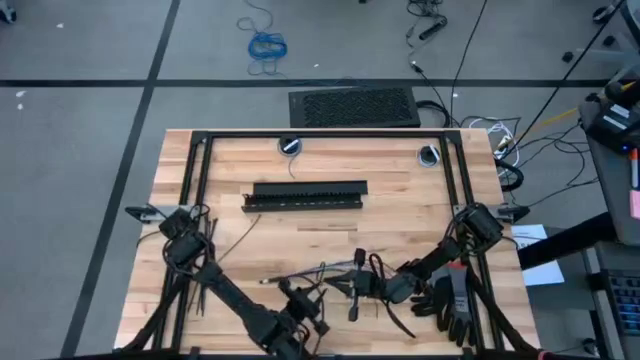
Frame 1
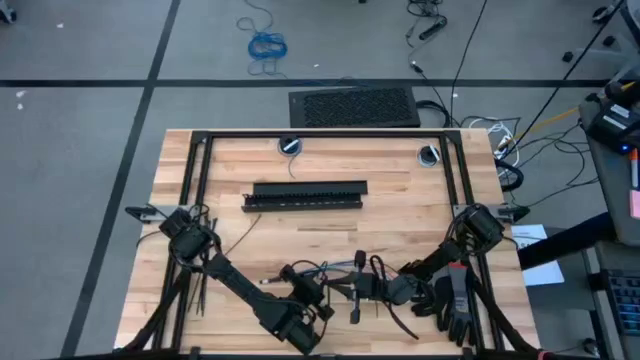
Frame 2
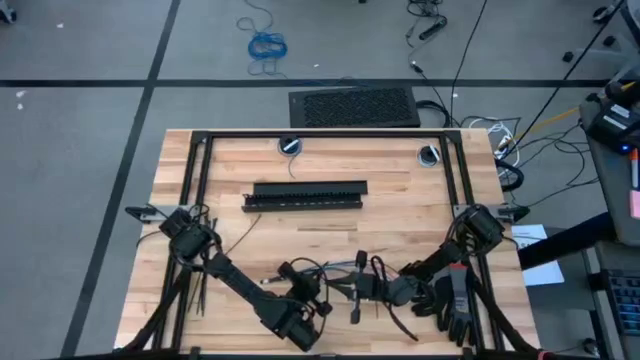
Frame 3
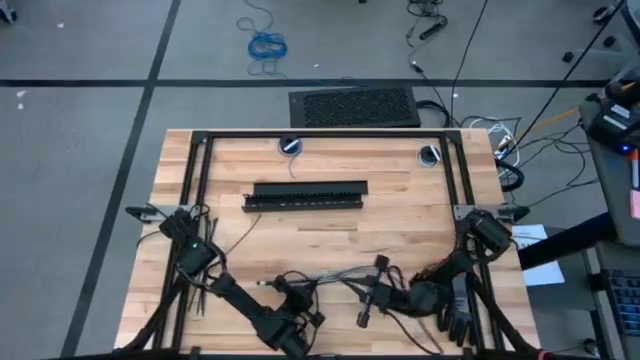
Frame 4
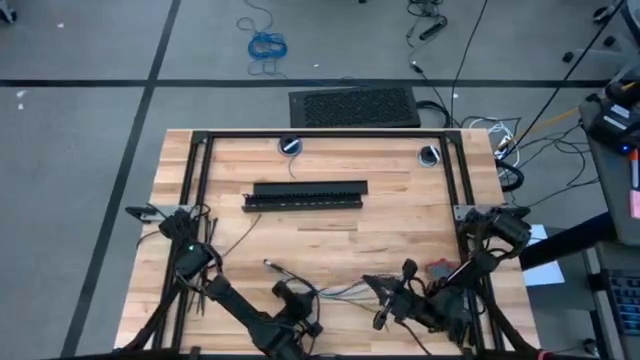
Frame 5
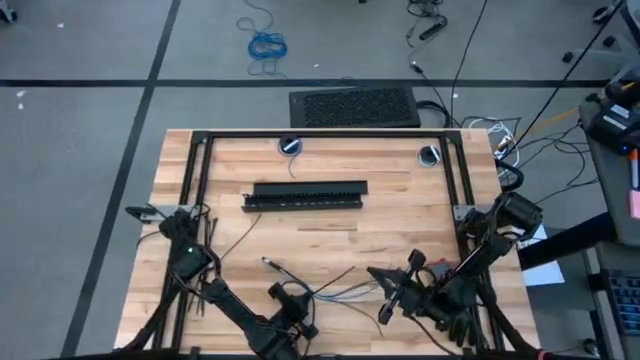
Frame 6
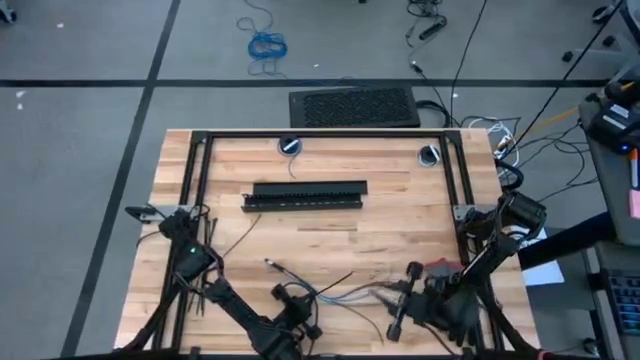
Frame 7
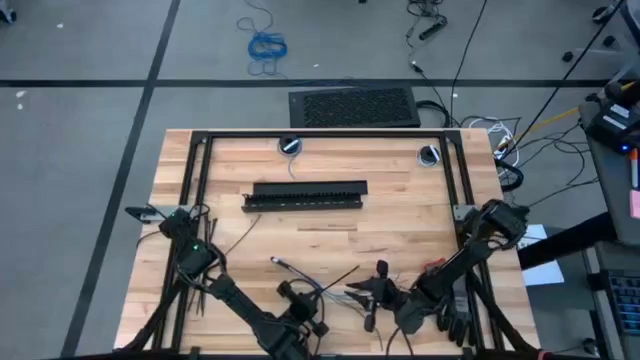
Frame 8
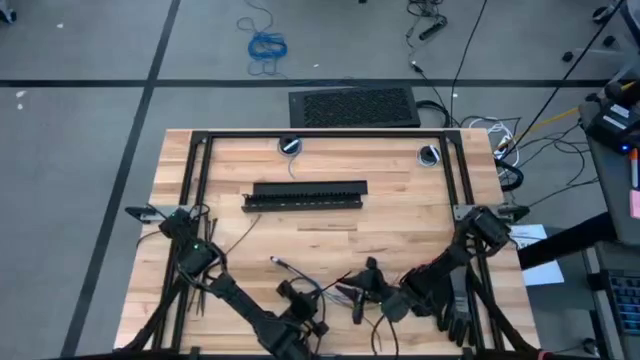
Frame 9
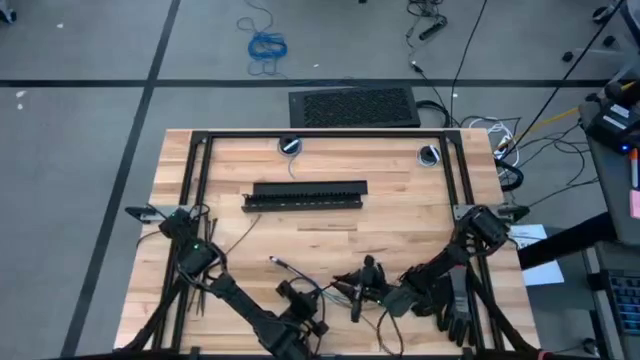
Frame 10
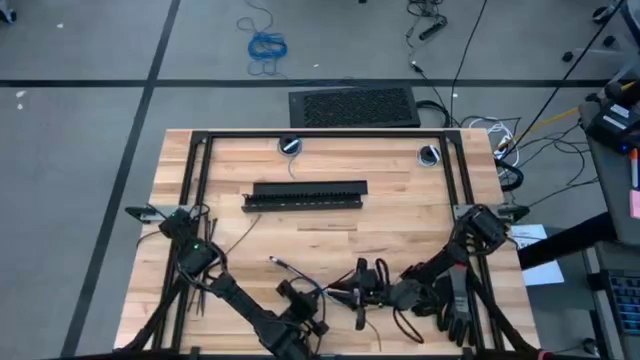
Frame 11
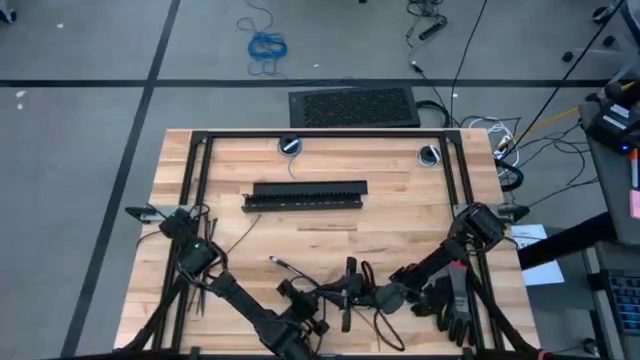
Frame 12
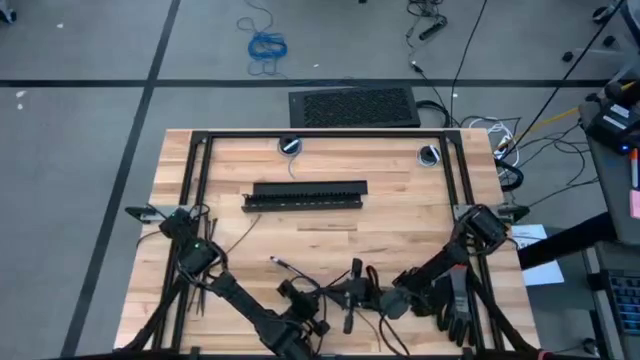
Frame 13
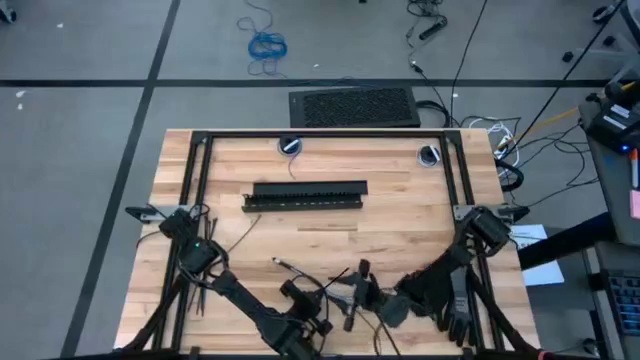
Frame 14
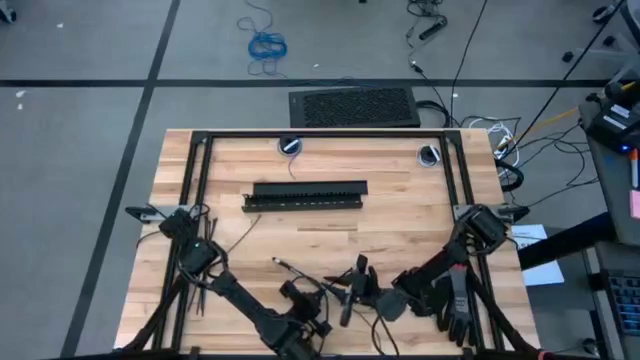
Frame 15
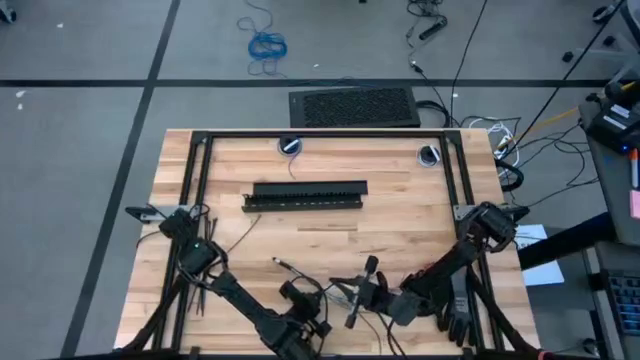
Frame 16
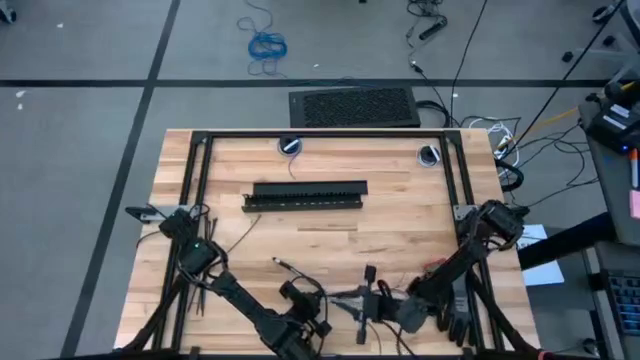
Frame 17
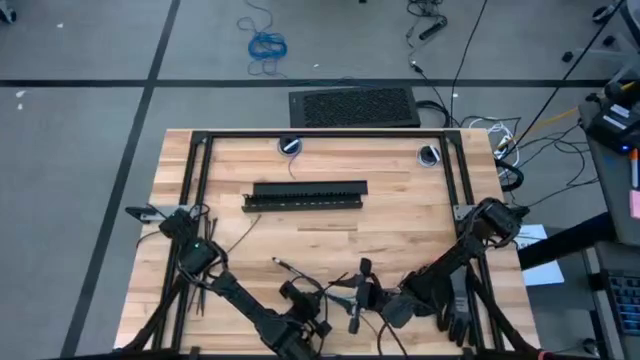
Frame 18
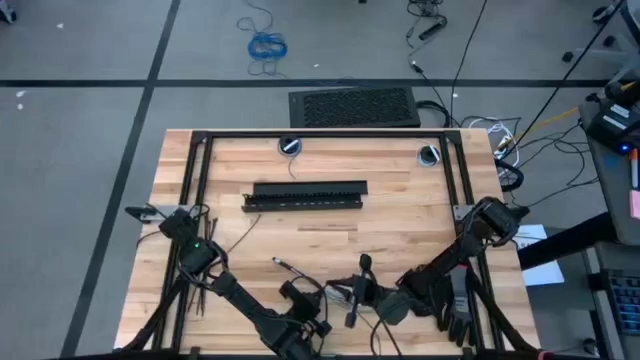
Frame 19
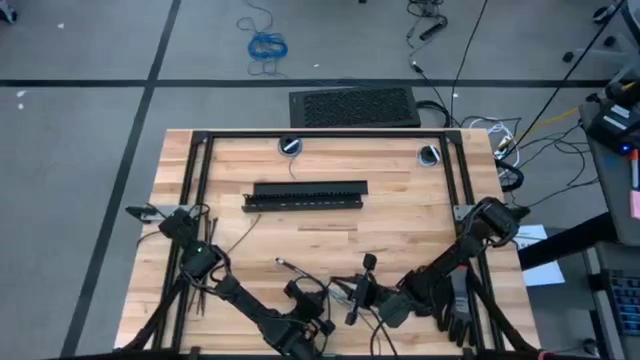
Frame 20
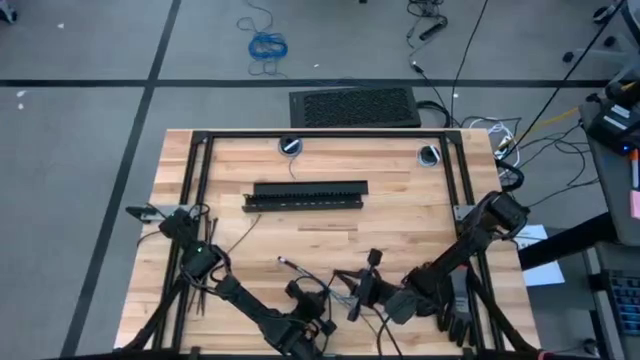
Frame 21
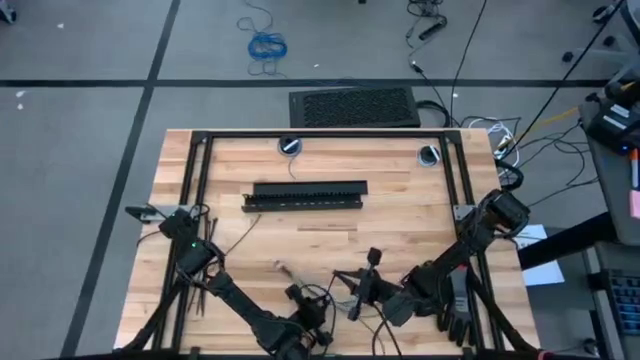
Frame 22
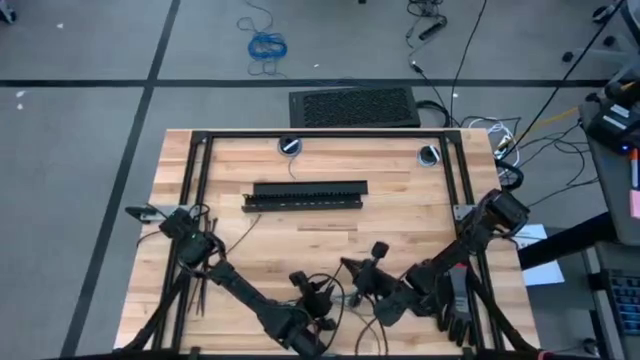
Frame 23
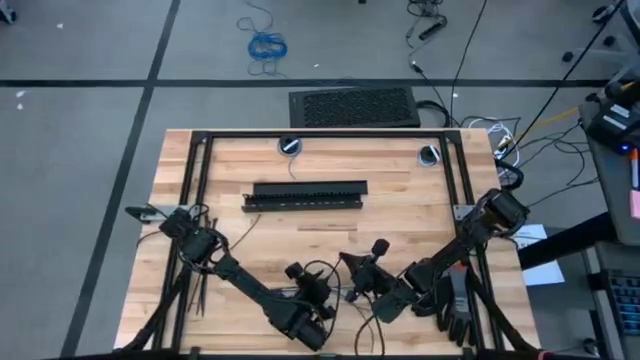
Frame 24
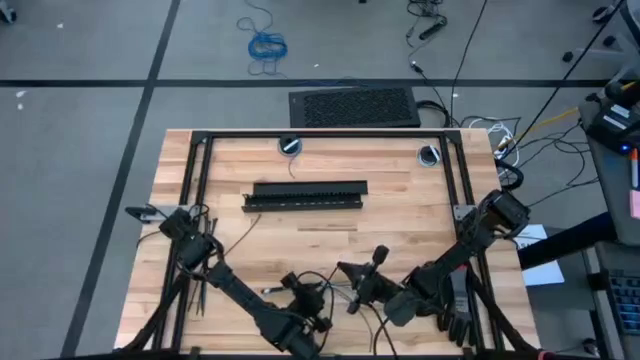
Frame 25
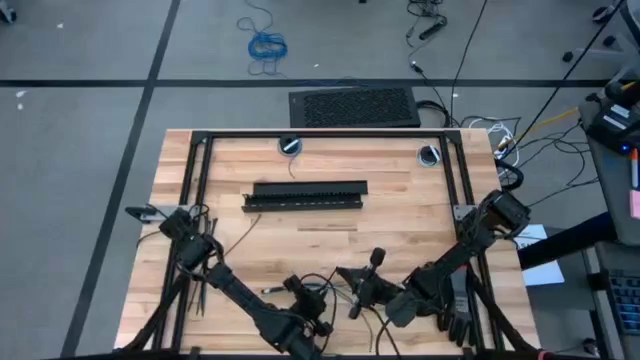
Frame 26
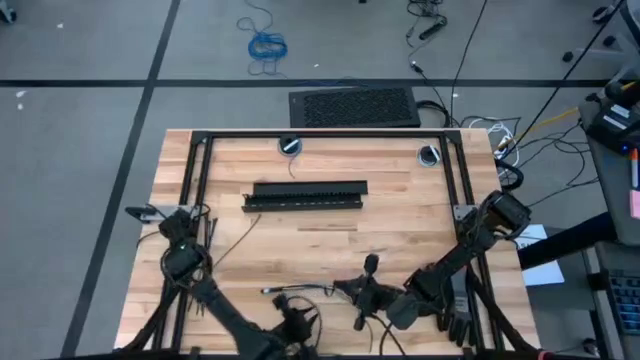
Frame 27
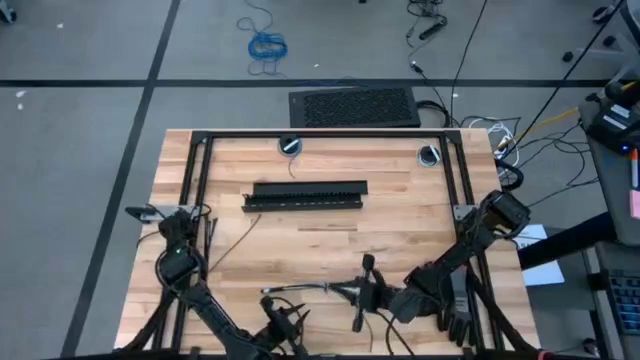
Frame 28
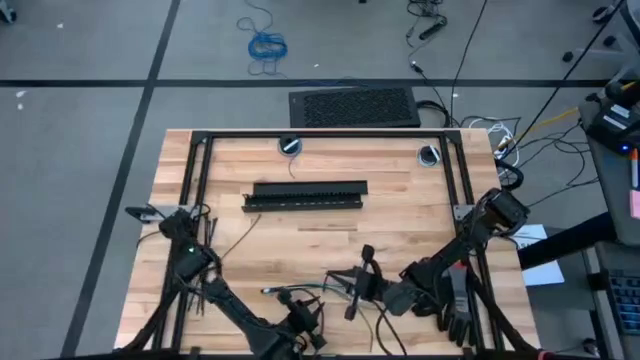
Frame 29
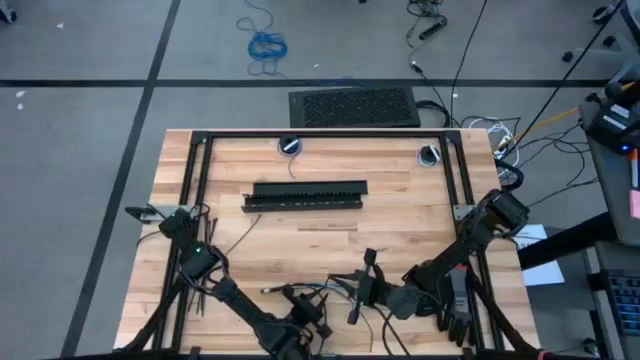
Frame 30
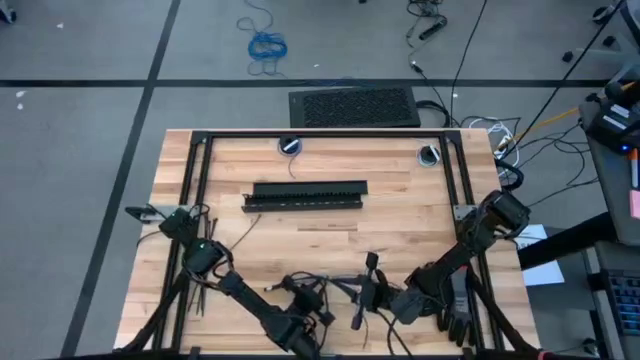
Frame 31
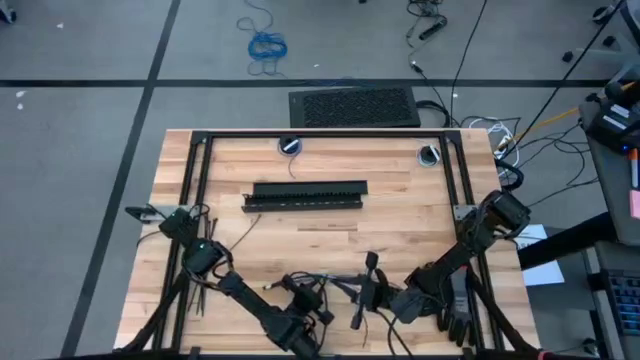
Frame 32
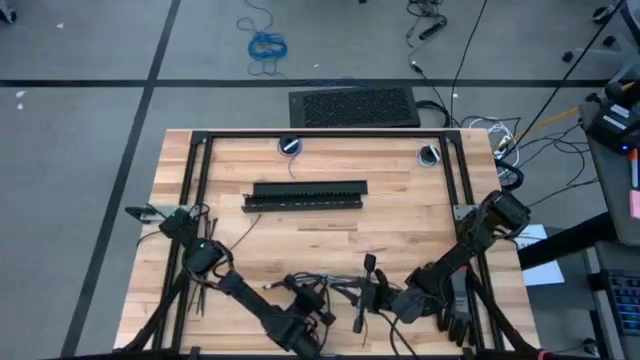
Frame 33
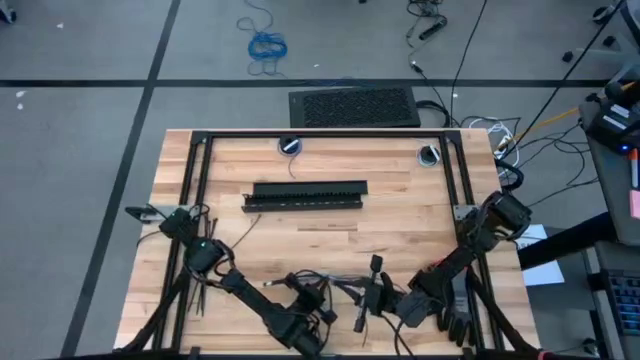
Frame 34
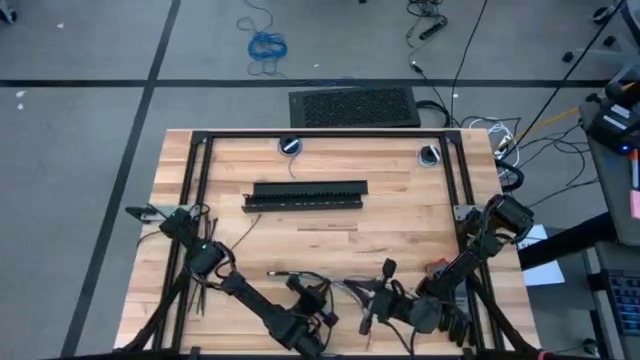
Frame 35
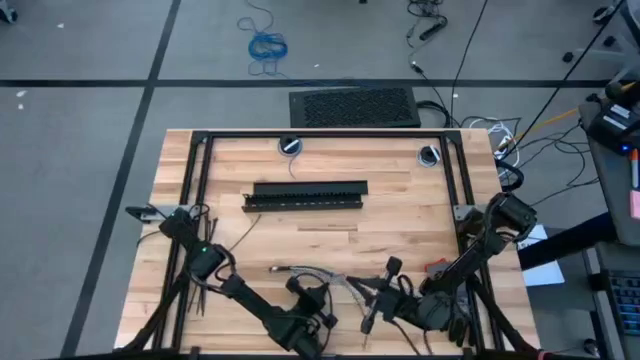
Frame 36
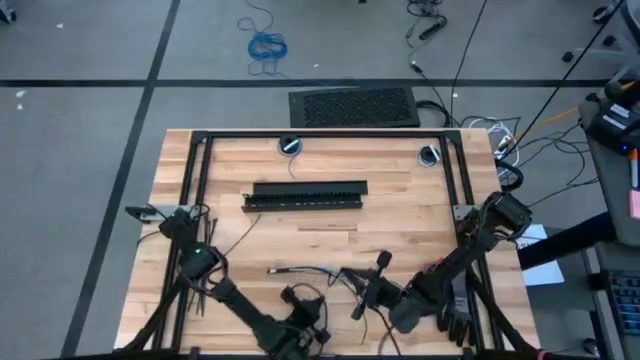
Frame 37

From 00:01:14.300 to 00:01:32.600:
Task: Ziptie cables
Wrap the cable wires with zip tie

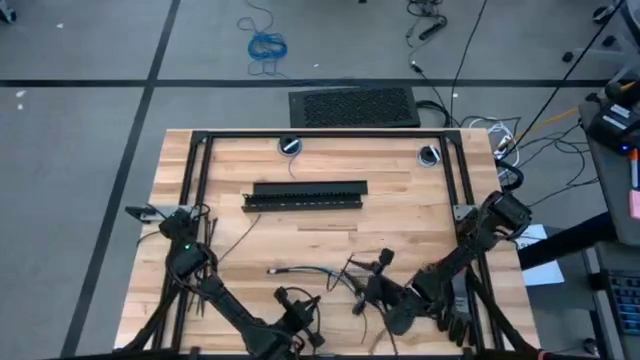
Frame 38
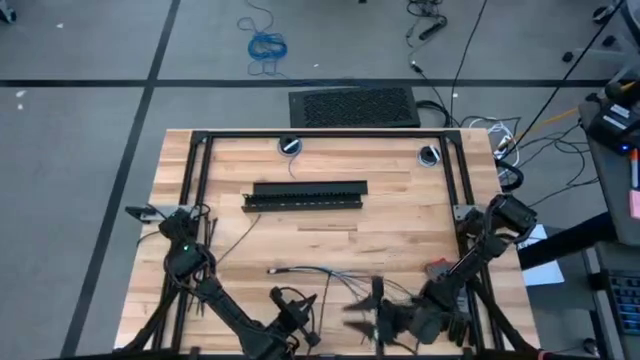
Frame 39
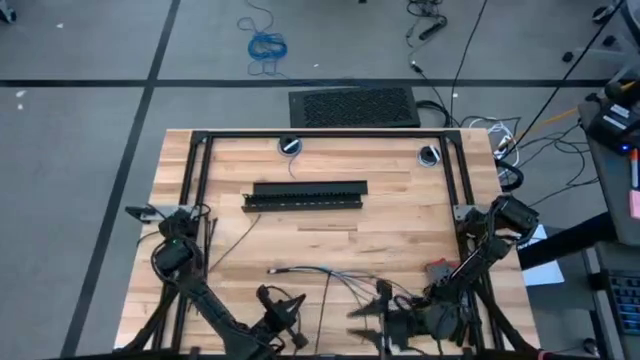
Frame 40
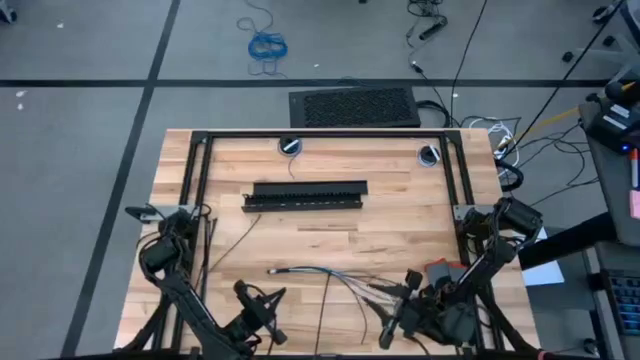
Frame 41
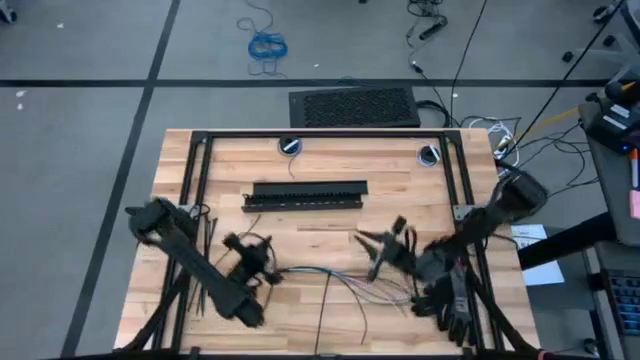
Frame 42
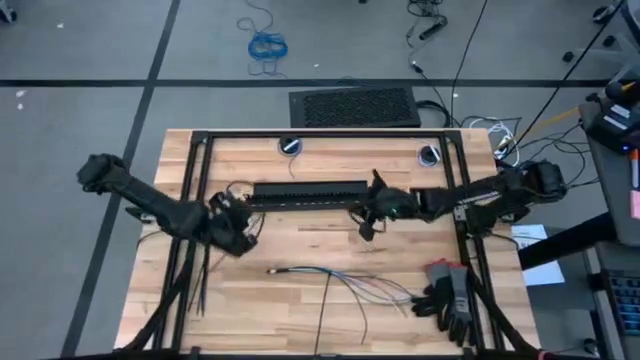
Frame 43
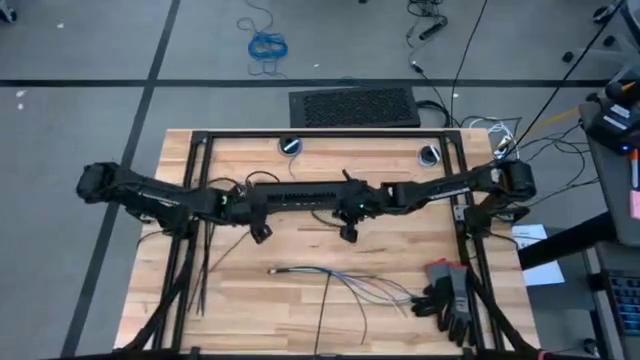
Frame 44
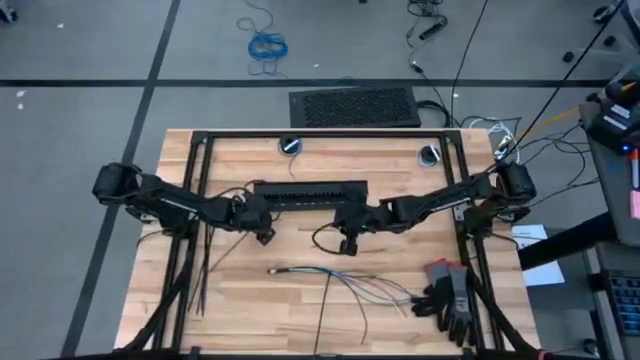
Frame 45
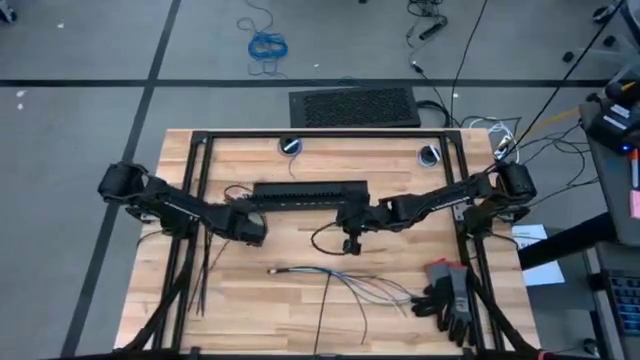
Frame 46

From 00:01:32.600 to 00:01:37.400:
Move the zip tie from the right to the left of the table
